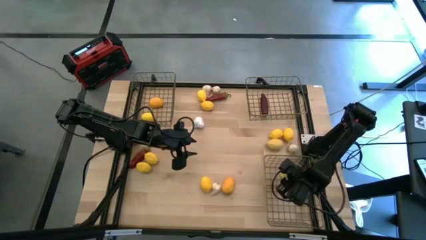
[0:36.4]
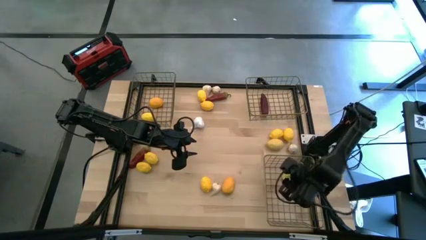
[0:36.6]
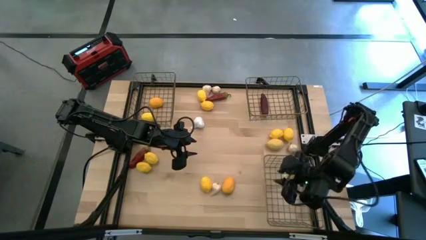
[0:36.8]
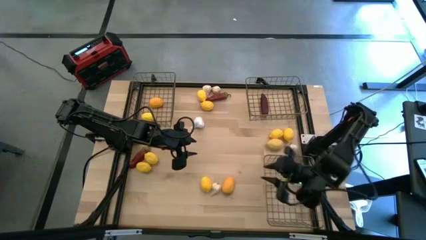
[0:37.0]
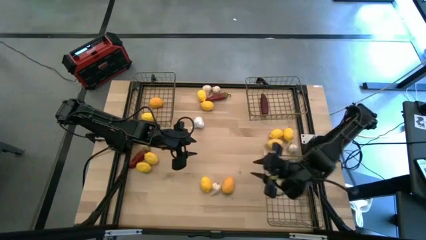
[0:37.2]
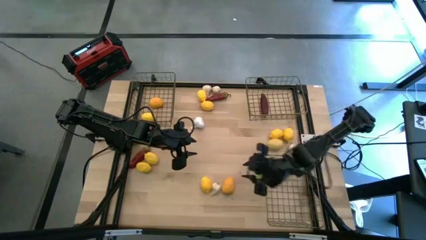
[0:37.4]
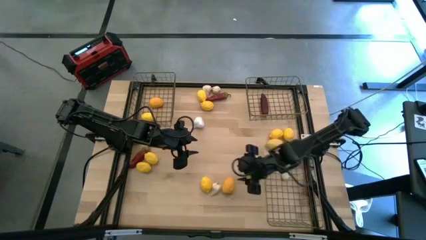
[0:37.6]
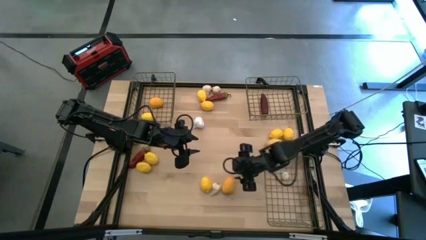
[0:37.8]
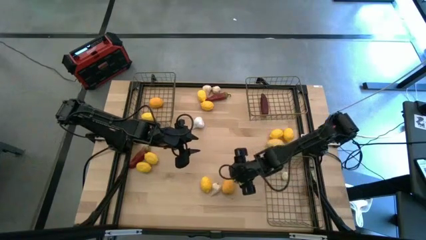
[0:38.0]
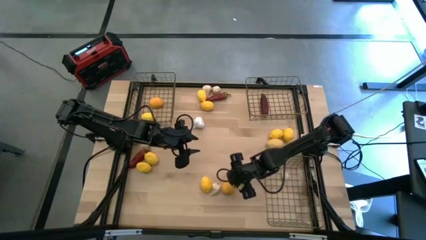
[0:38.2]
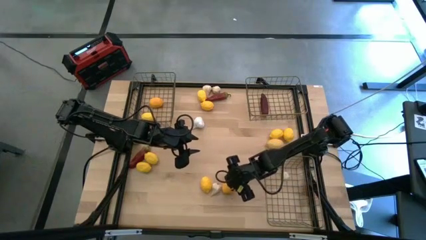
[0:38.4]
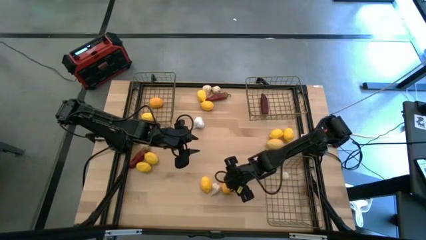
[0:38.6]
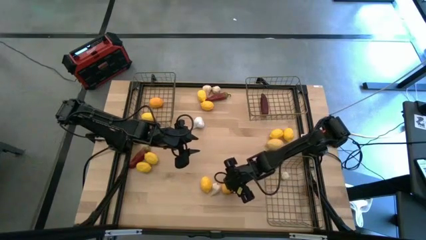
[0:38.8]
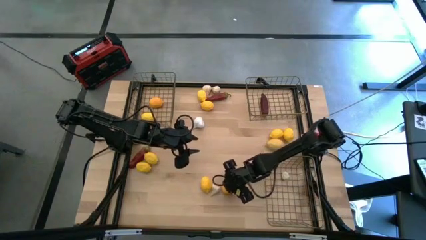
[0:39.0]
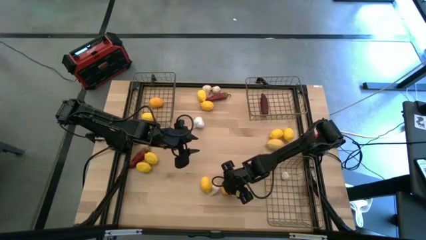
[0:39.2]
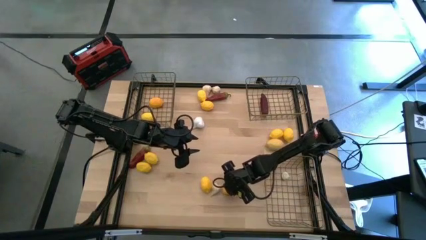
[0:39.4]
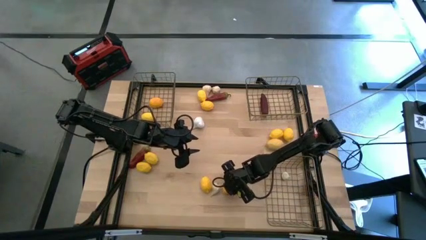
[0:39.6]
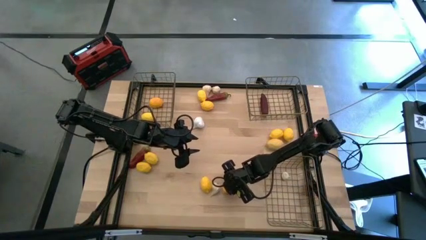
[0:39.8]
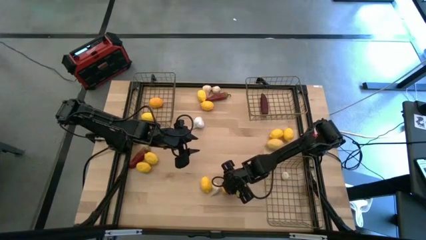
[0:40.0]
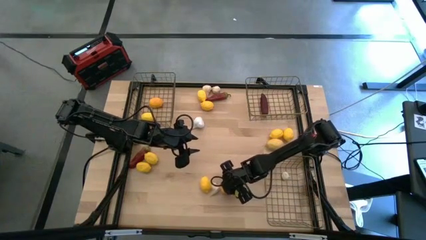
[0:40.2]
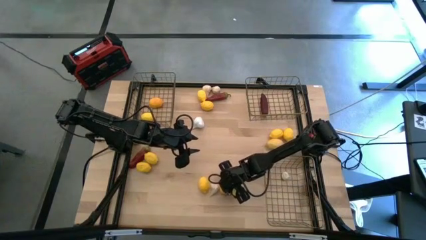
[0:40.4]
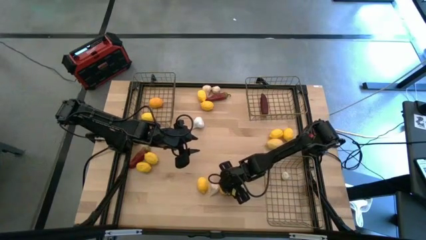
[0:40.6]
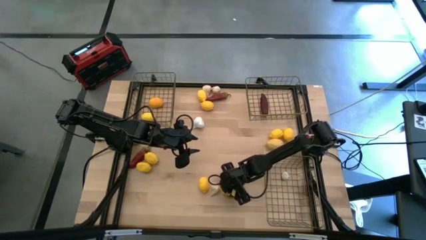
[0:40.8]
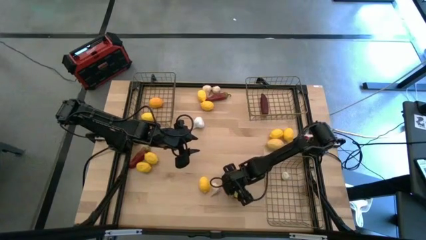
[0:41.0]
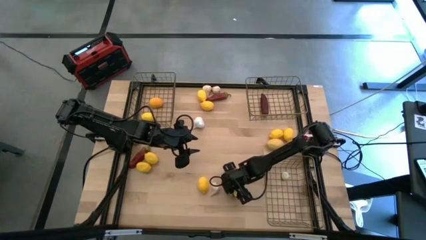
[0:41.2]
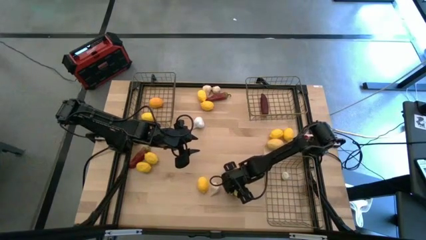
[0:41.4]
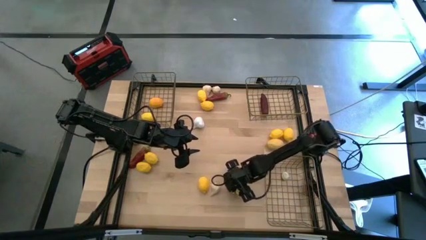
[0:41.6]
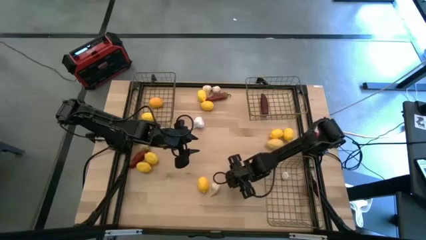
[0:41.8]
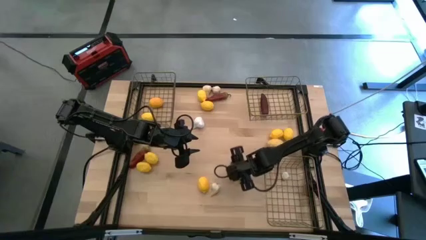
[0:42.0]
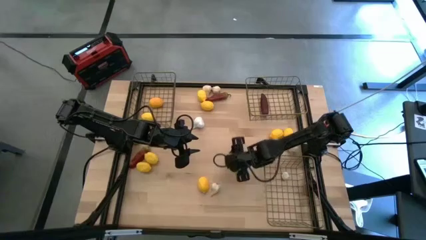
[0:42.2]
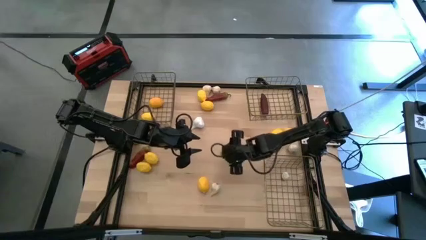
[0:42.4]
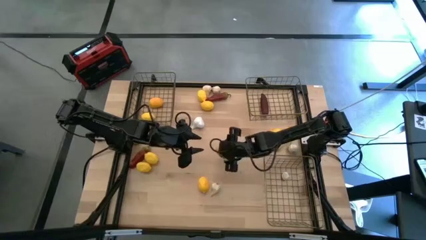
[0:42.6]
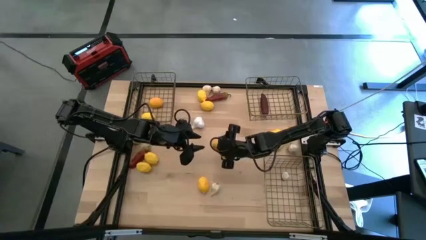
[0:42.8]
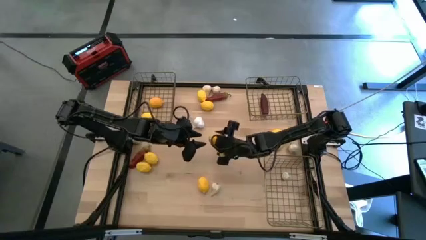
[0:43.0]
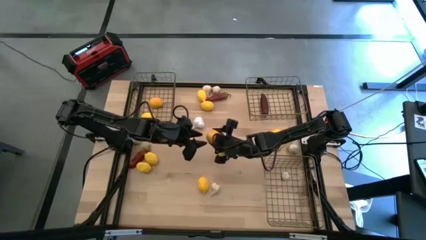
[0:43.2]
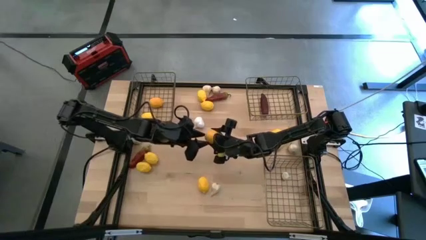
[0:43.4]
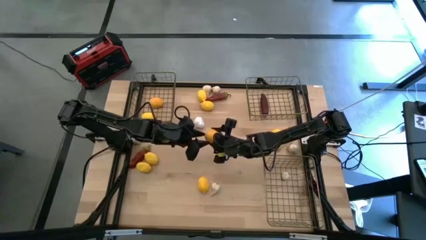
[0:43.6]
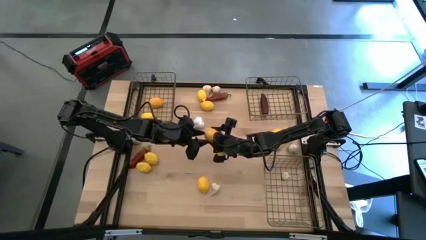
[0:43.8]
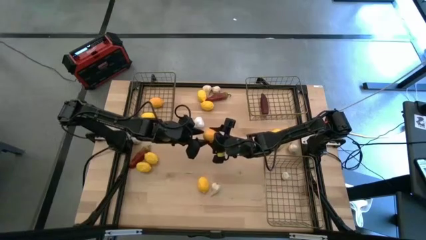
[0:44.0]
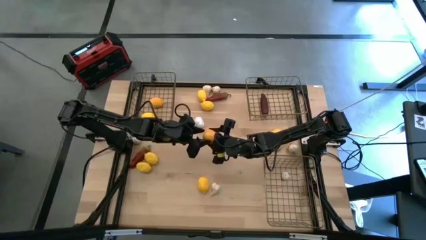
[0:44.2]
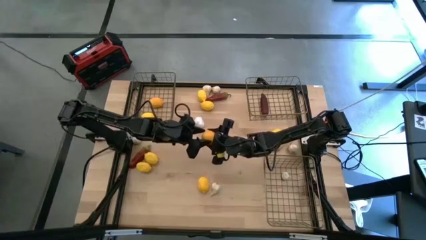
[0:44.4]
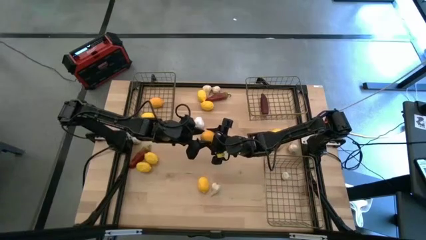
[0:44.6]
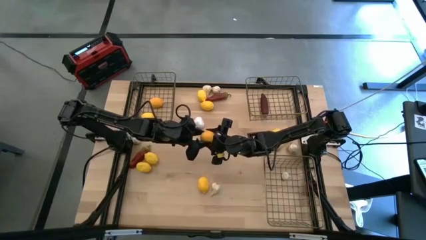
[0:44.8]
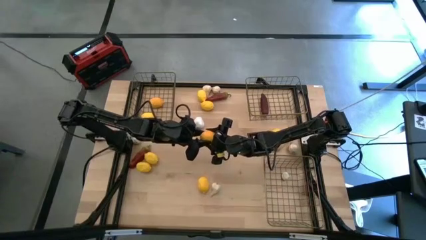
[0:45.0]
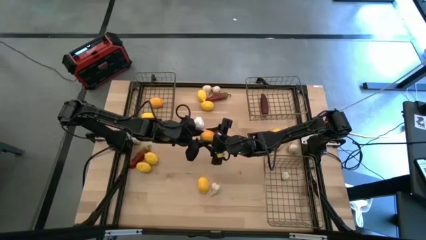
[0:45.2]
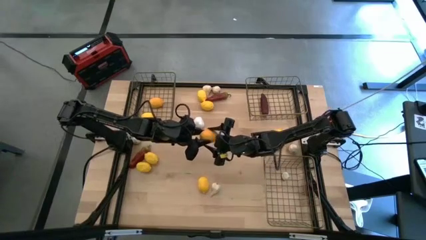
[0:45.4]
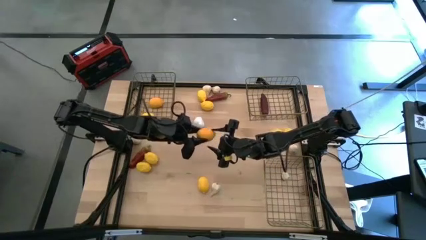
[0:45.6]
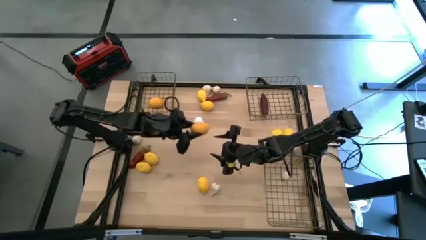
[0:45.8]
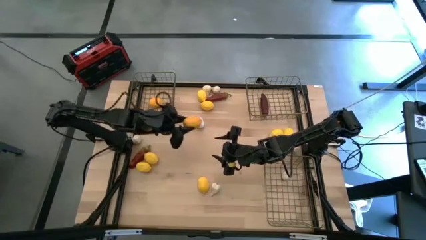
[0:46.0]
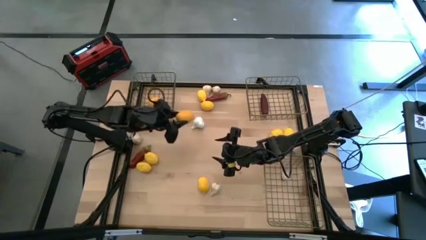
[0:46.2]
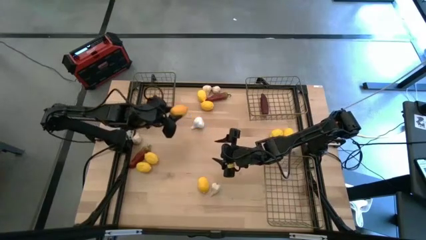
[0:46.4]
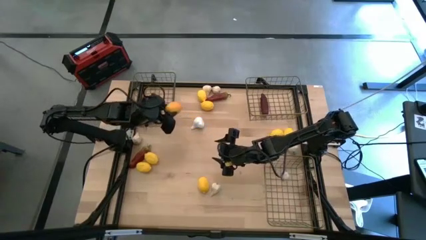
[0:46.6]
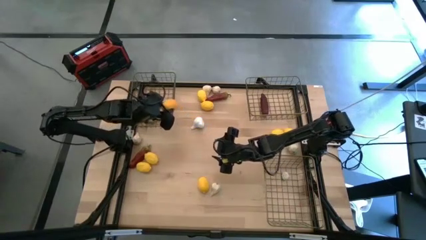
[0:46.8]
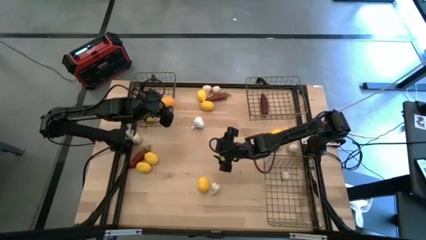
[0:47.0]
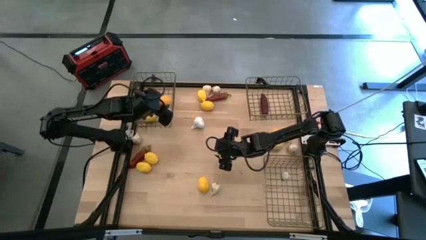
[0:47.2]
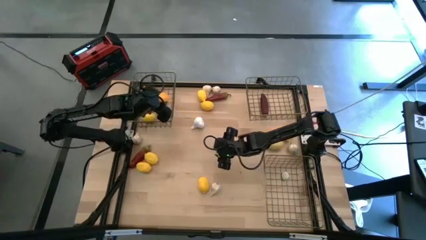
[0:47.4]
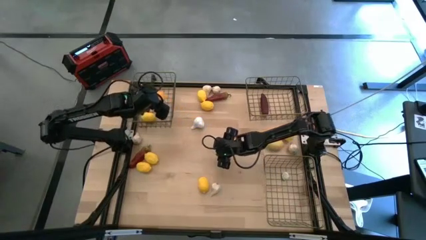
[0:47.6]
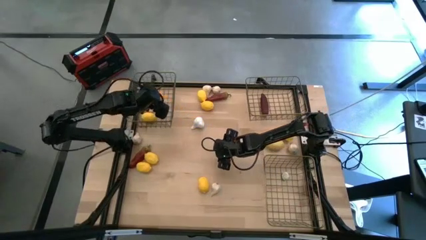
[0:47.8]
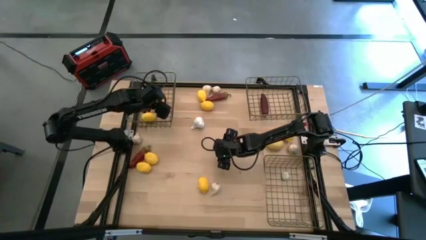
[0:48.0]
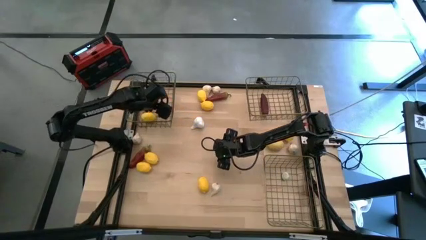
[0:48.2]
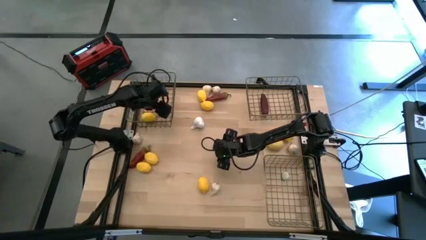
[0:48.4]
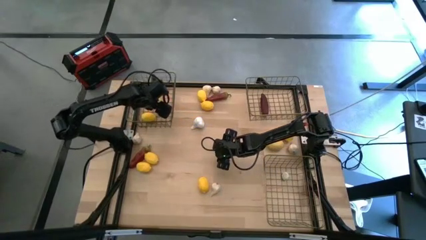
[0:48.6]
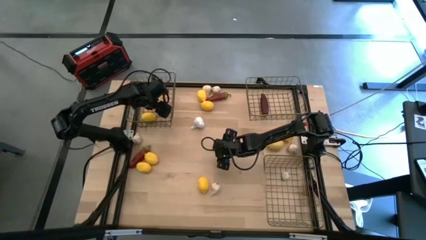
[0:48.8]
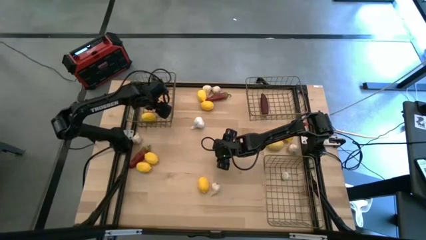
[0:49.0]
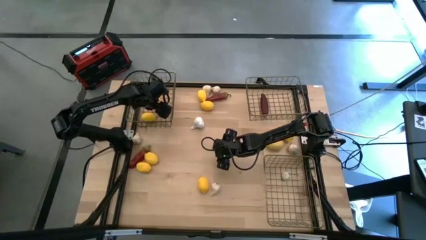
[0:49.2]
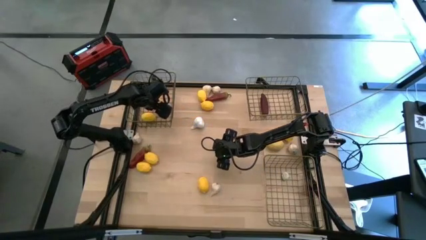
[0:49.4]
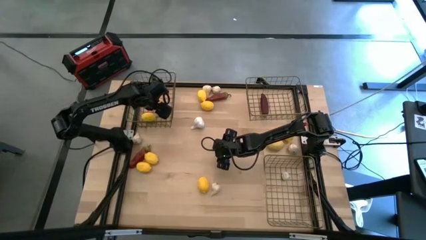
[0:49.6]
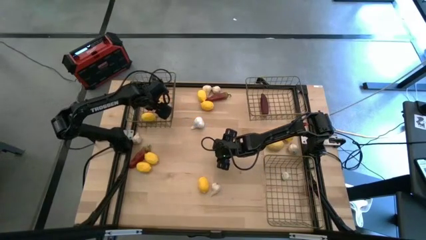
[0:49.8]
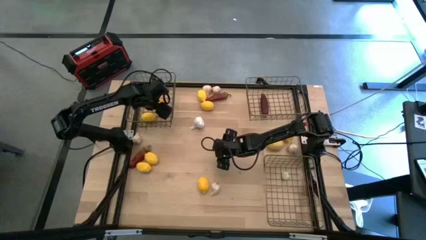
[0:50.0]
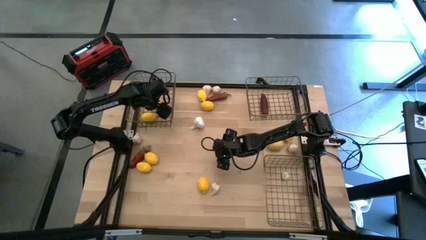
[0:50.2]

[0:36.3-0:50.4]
Task: Sort produce into baskets
Put the yellow lemon into the top left wire basket
